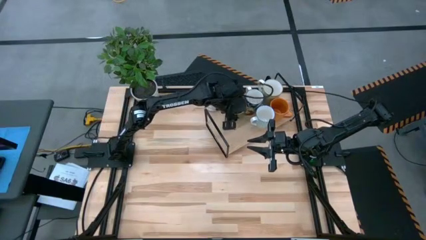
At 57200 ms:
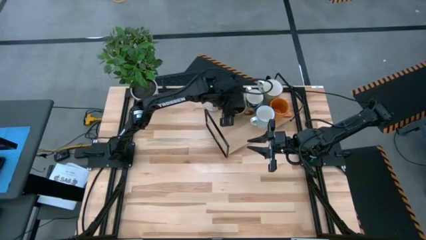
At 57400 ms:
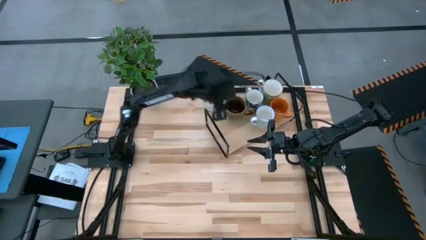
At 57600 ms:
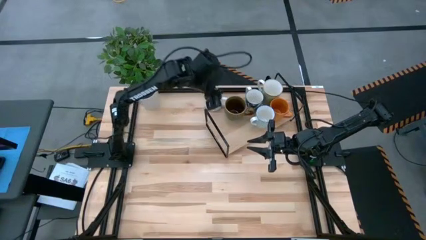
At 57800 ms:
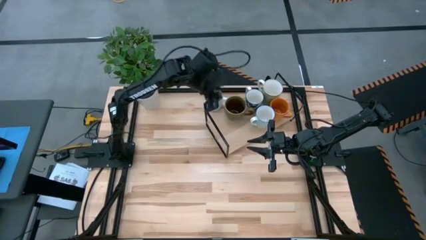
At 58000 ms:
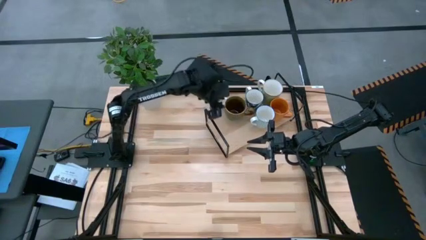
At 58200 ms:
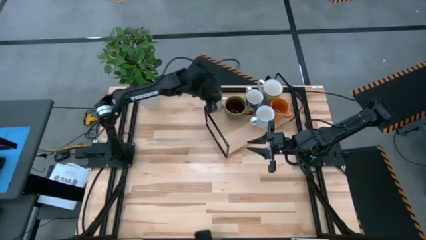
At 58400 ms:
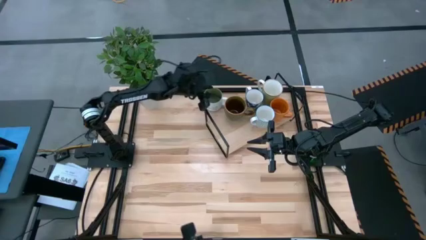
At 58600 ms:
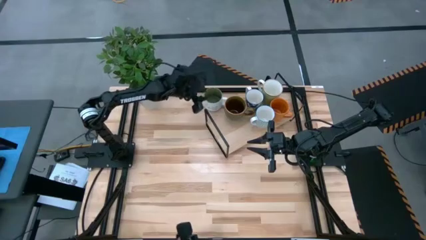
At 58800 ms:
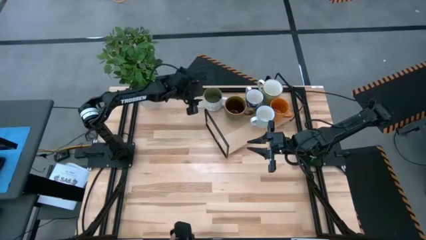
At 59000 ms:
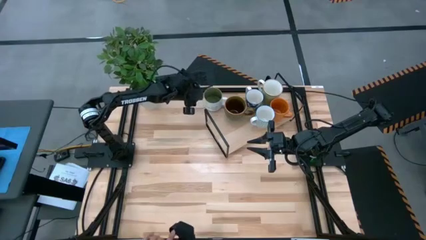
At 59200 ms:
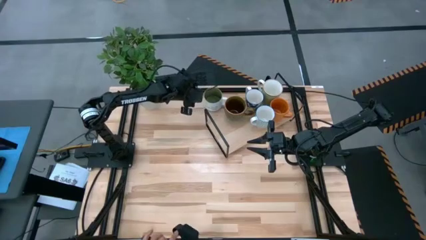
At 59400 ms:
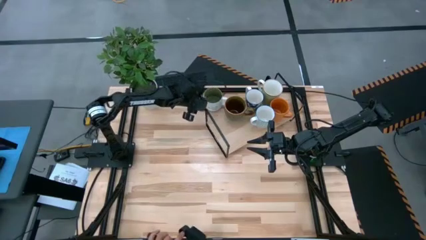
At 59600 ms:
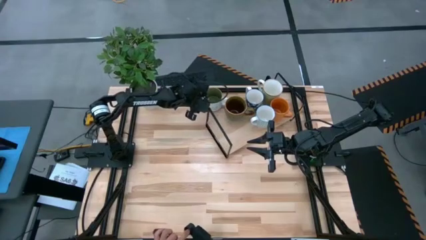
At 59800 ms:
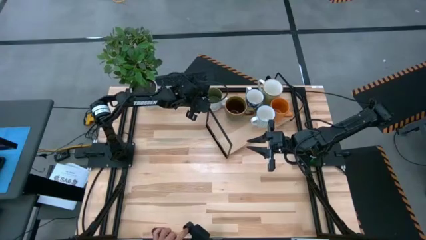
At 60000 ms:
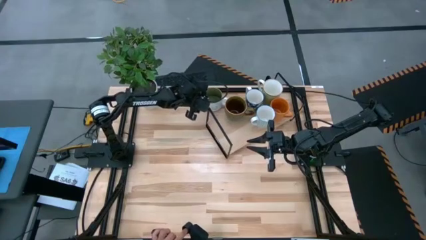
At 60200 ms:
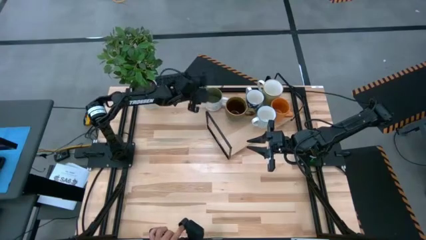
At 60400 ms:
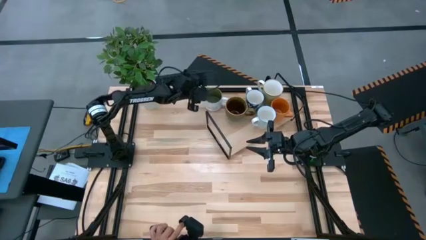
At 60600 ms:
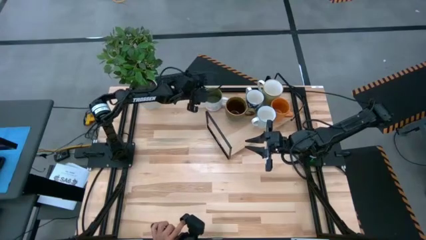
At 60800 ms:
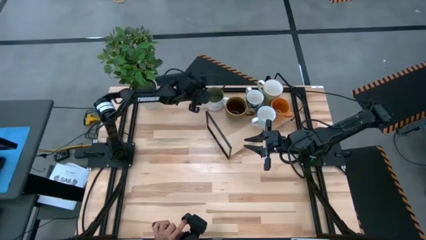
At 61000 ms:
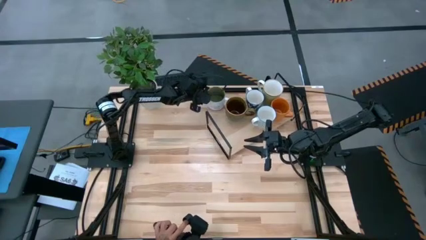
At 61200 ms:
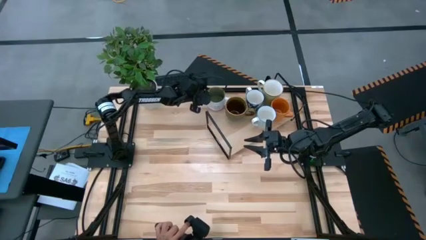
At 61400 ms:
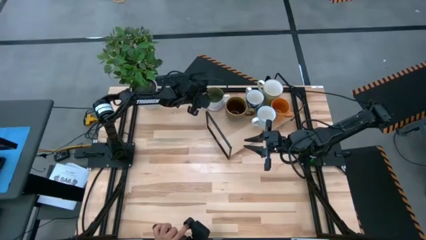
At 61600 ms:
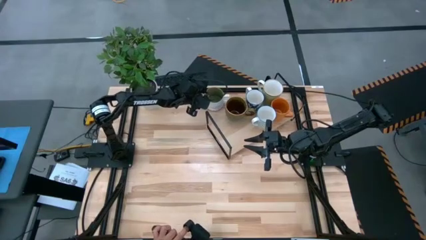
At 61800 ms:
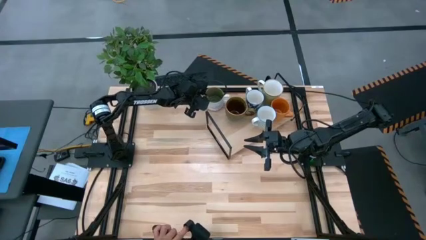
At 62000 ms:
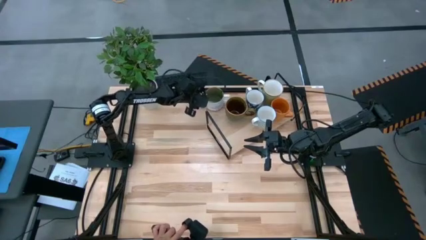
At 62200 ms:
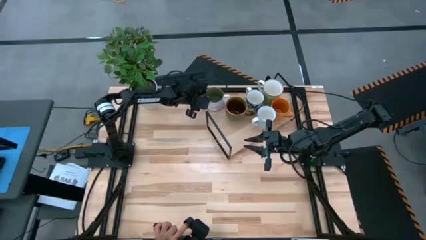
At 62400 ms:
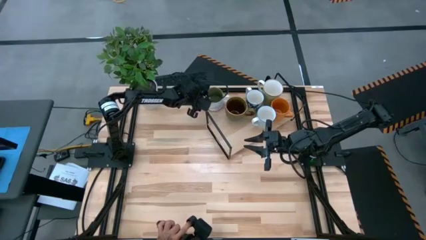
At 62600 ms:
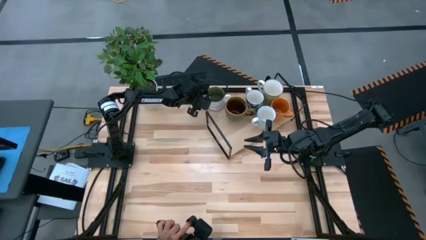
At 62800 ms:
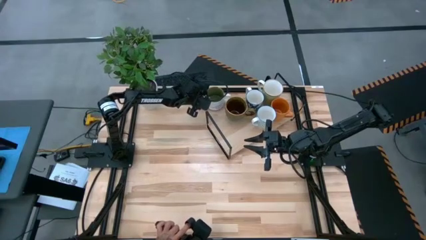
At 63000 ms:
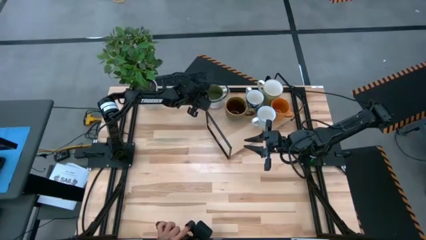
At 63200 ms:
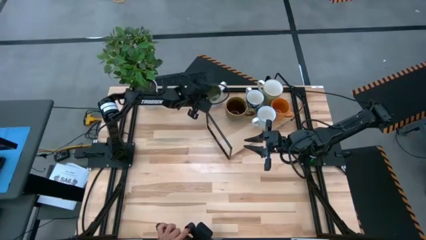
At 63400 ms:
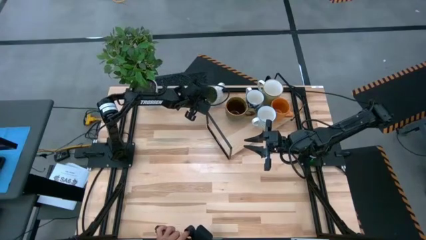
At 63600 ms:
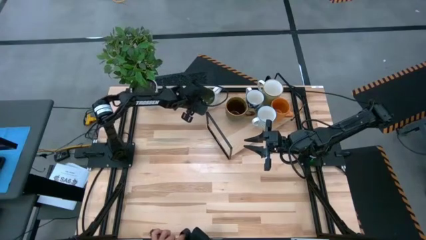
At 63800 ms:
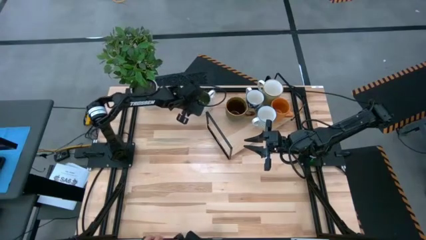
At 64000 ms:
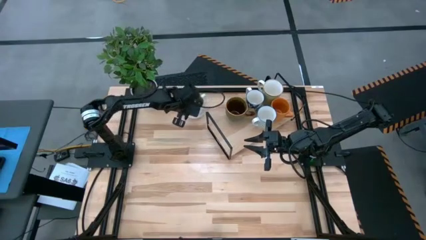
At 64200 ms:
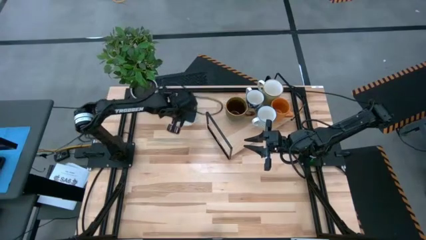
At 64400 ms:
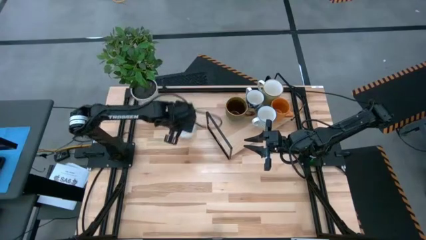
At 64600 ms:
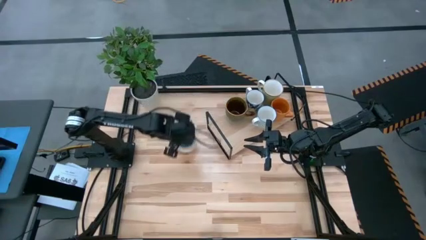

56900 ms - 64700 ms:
Task: Place coffee mugs
Put the white mug on the shelf

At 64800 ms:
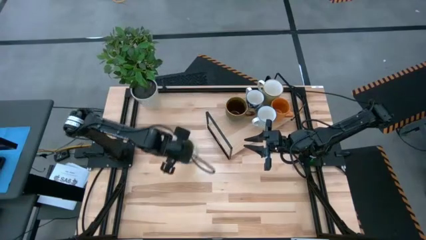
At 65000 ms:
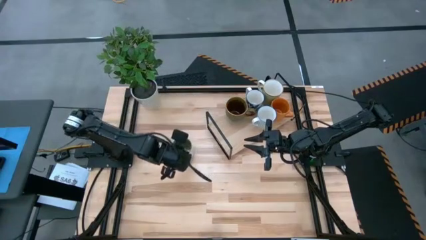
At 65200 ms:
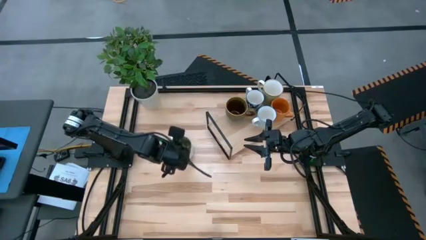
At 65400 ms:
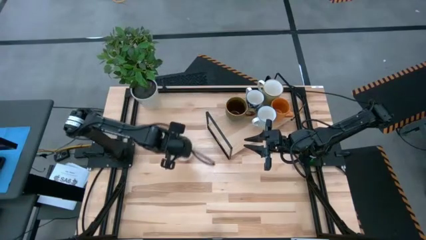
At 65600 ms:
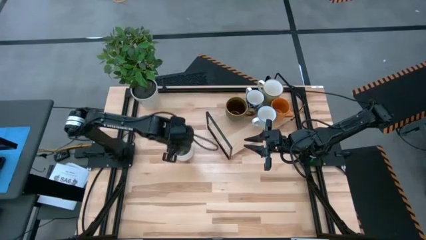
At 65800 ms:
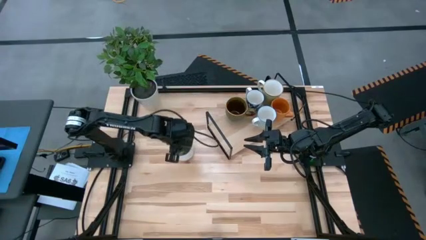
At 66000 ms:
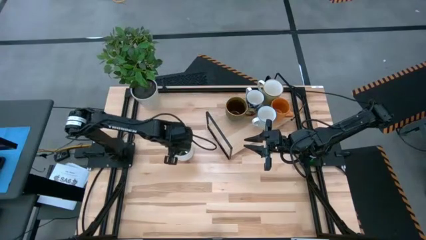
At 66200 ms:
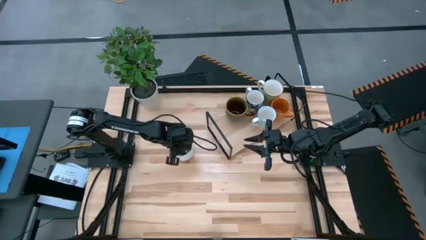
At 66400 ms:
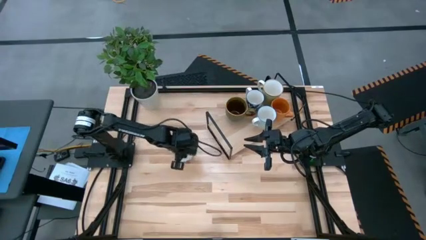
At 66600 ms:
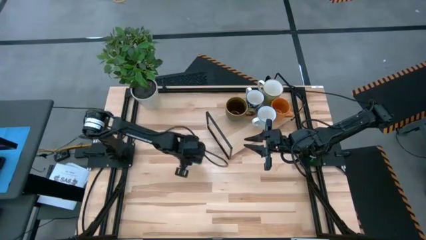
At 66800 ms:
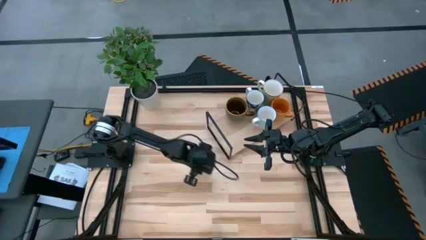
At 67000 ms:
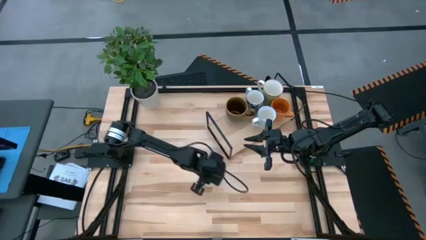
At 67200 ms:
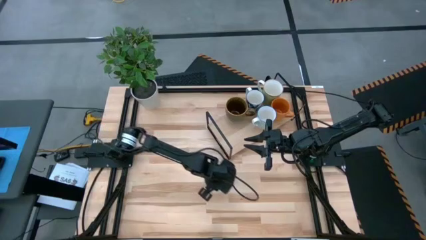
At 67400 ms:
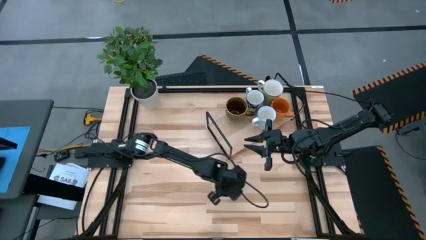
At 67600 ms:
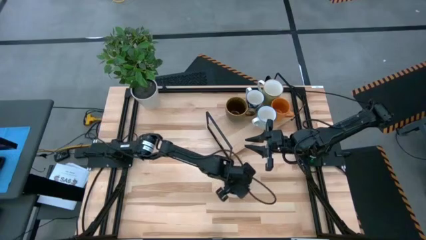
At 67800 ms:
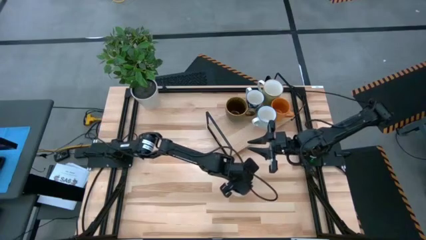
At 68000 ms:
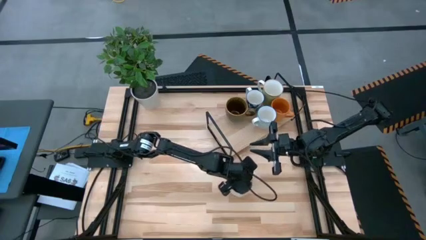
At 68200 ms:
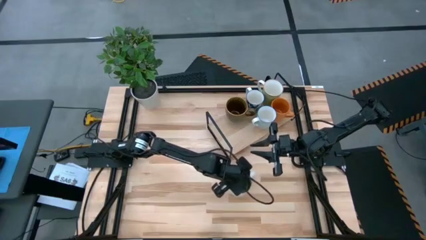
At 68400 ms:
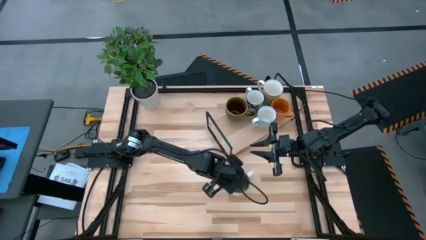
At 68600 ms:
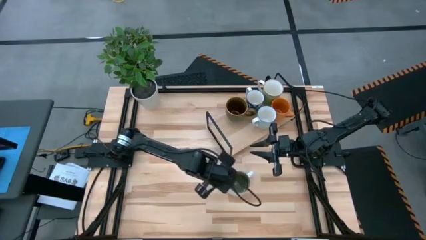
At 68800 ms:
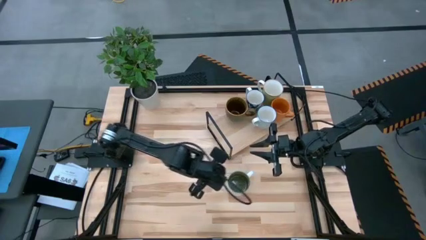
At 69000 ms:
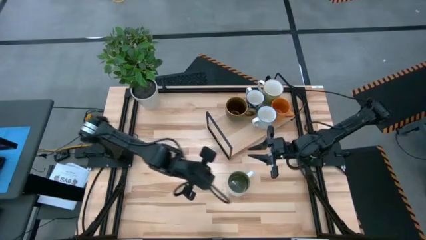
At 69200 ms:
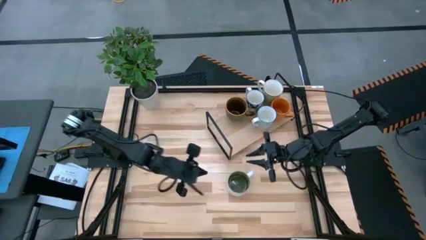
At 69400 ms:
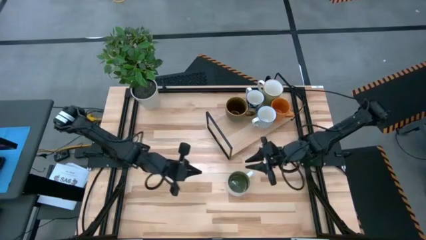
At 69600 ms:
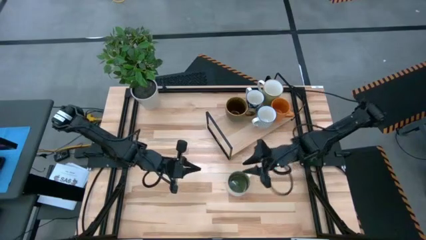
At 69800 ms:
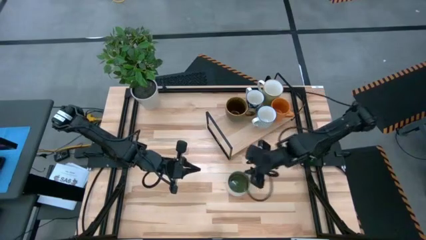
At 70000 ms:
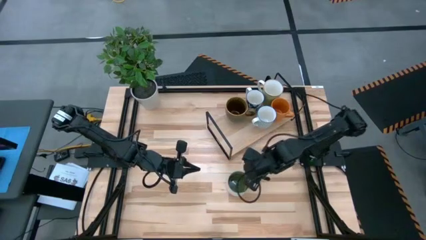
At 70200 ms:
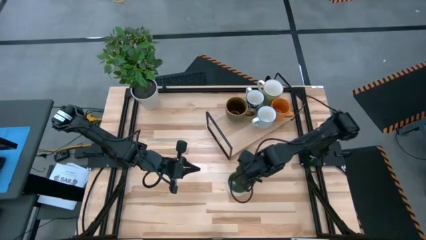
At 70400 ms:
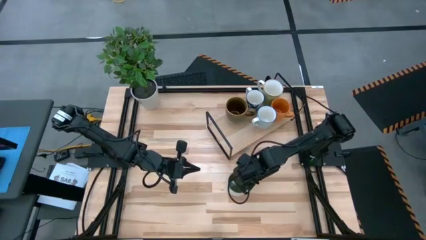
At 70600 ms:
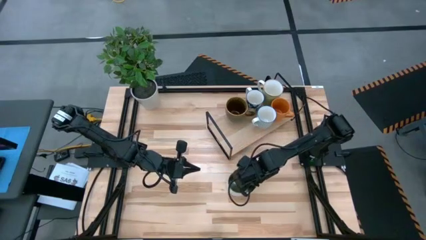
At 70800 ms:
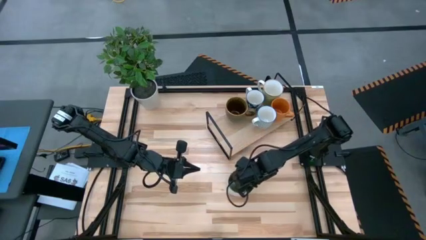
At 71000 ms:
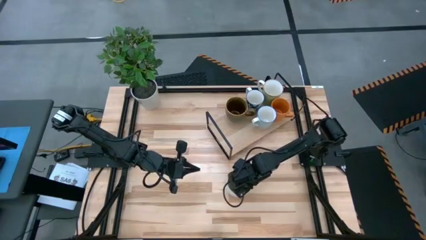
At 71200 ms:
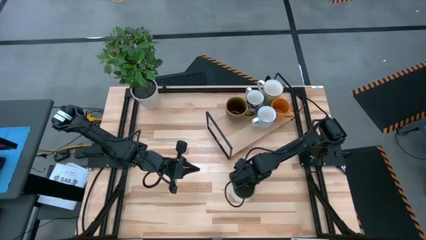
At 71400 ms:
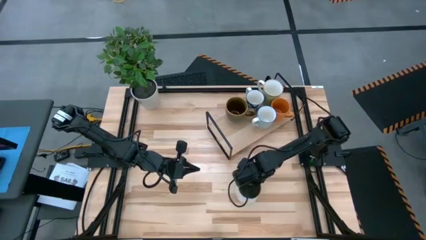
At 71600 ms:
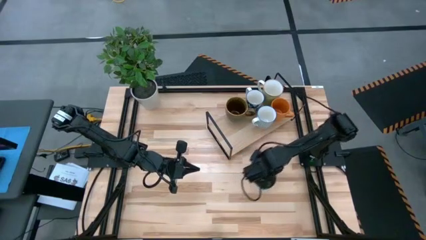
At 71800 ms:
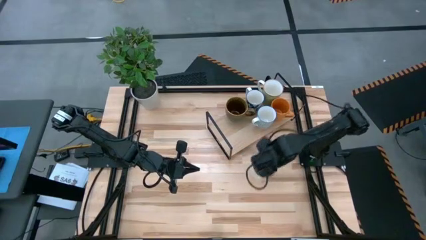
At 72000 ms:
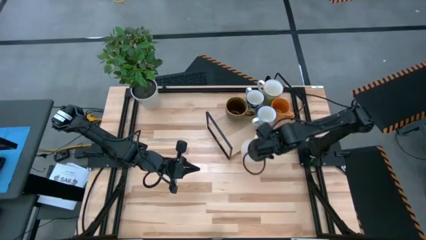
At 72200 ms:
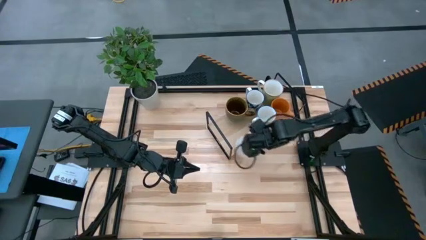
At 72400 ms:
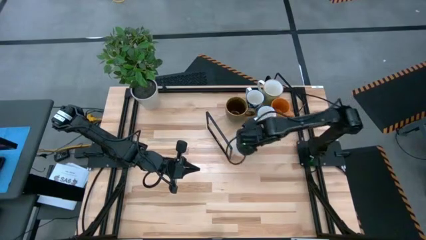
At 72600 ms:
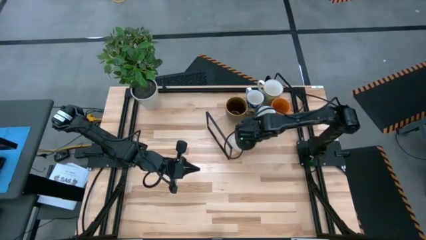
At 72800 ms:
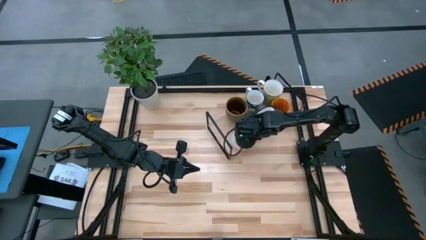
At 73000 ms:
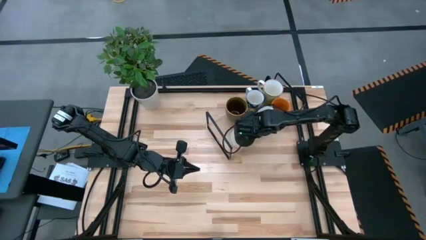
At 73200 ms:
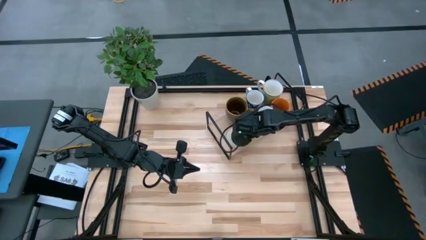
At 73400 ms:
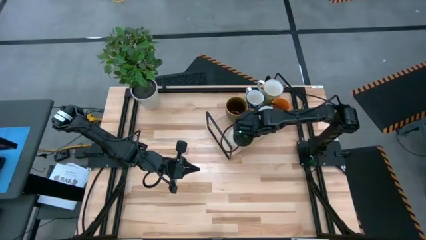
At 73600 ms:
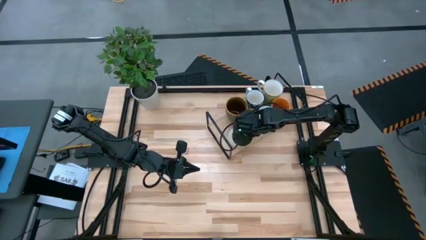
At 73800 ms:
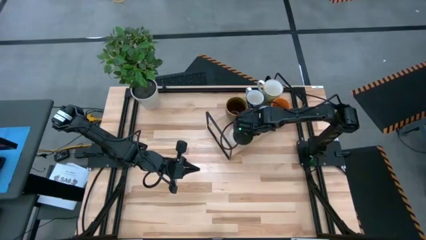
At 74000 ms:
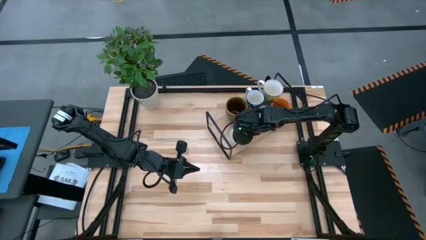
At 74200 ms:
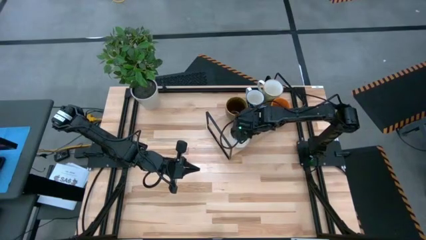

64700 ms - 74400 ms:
Put the white mug on the shelf
